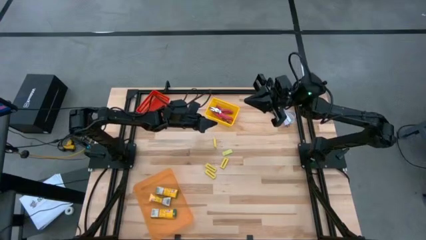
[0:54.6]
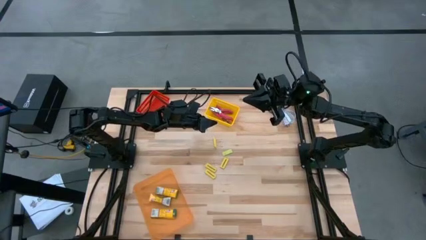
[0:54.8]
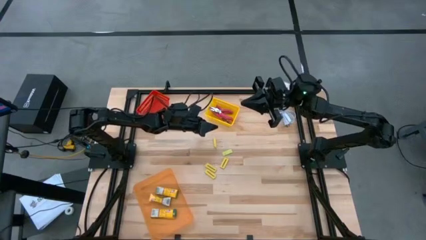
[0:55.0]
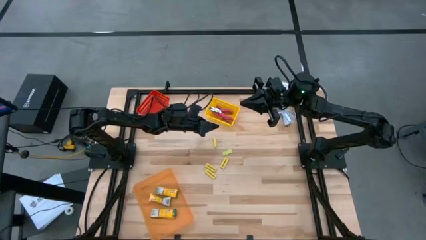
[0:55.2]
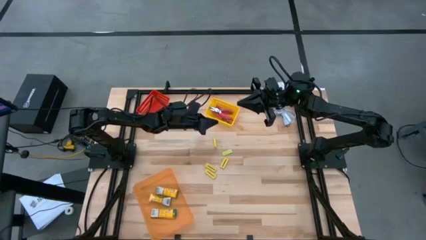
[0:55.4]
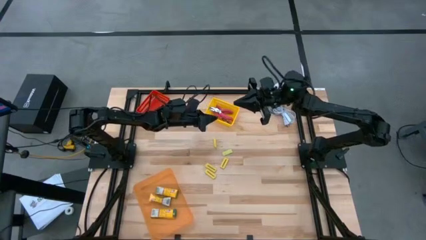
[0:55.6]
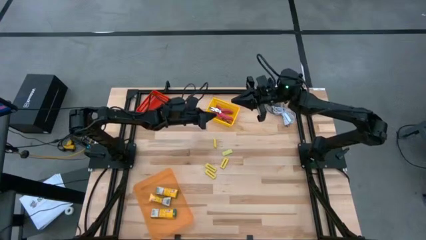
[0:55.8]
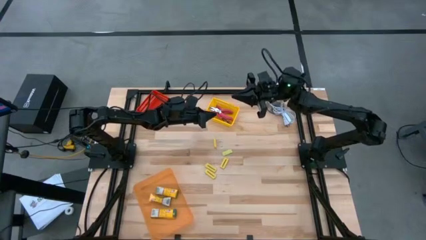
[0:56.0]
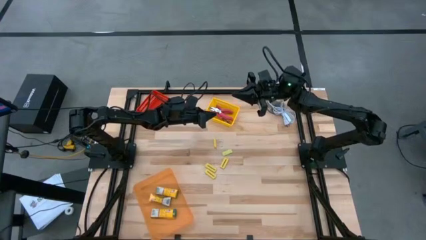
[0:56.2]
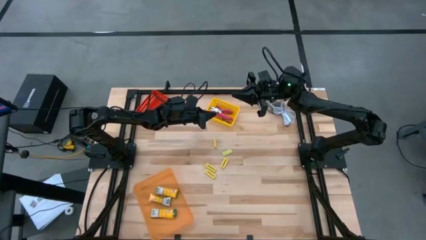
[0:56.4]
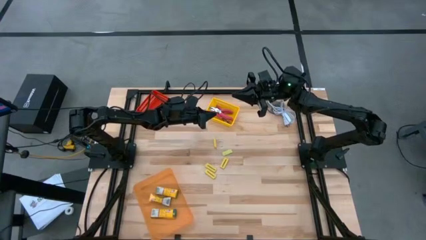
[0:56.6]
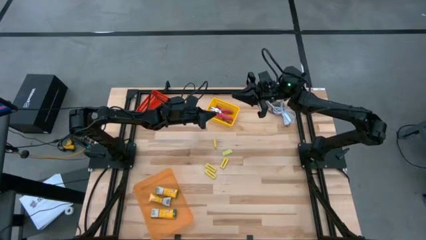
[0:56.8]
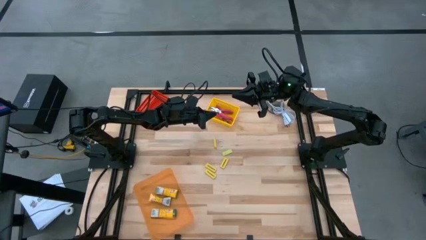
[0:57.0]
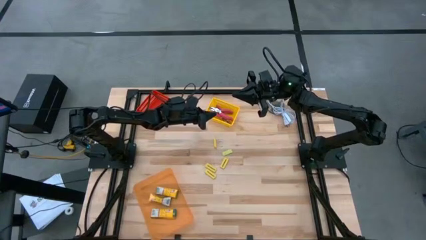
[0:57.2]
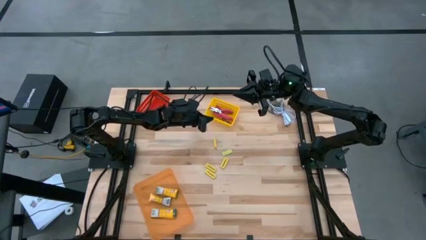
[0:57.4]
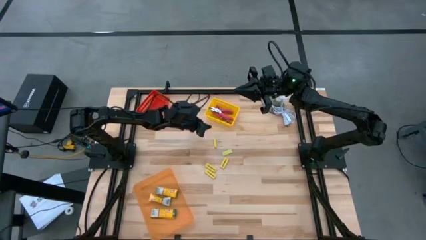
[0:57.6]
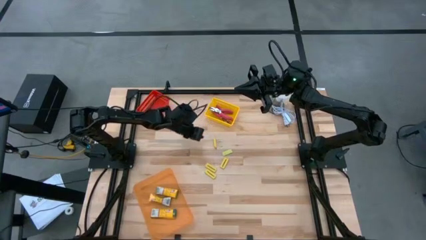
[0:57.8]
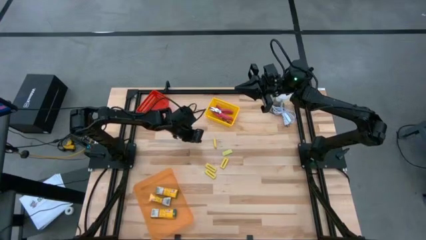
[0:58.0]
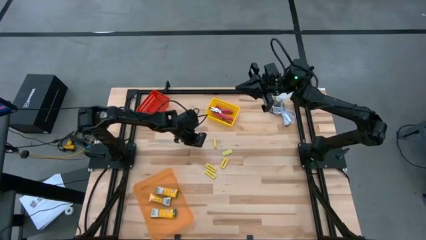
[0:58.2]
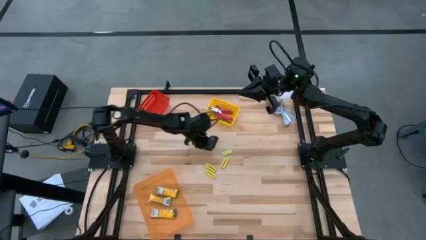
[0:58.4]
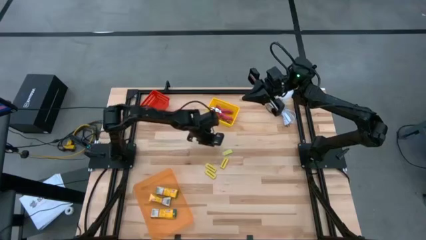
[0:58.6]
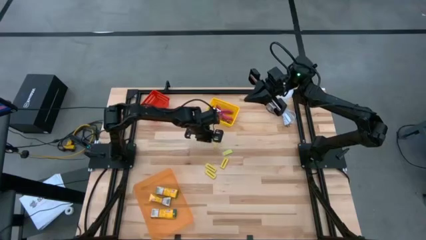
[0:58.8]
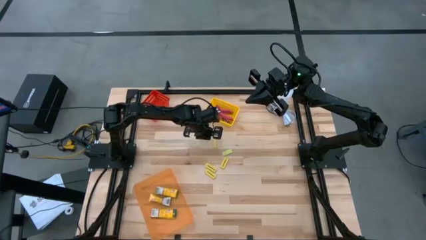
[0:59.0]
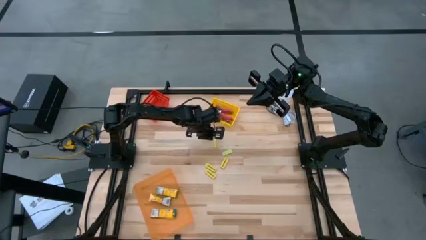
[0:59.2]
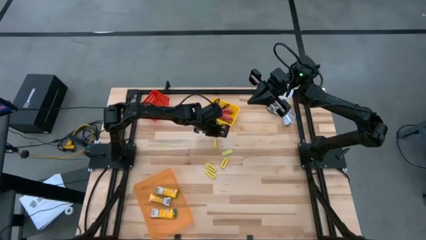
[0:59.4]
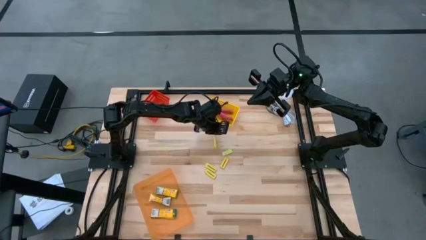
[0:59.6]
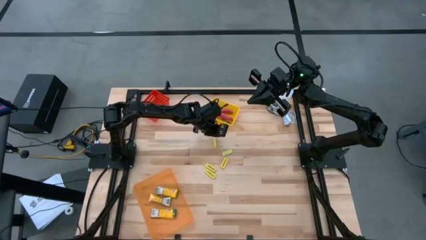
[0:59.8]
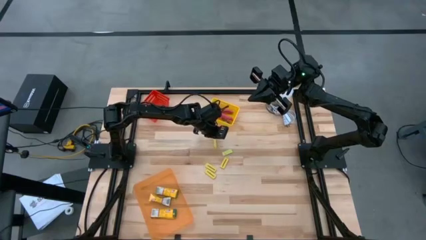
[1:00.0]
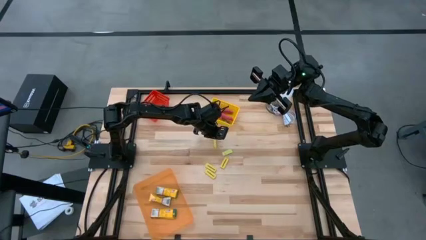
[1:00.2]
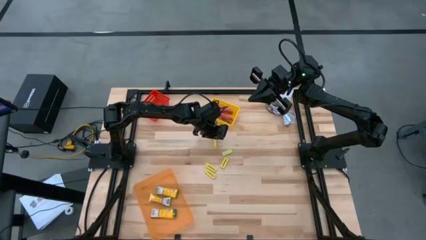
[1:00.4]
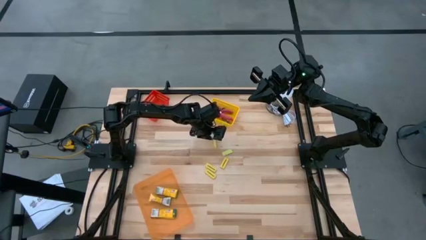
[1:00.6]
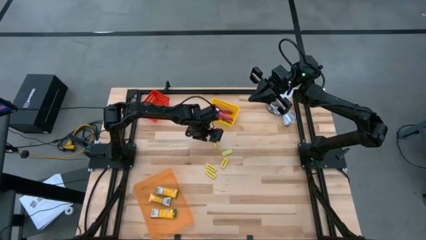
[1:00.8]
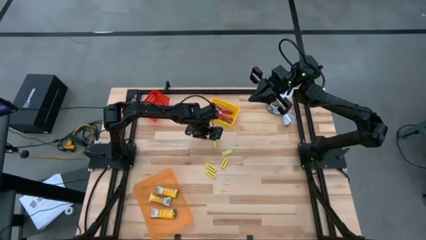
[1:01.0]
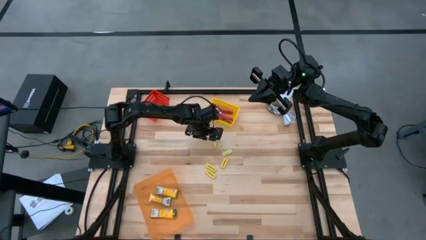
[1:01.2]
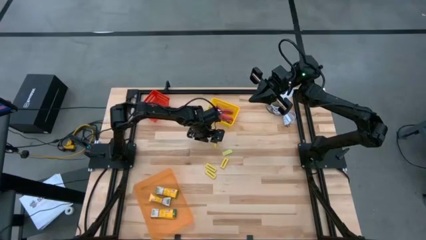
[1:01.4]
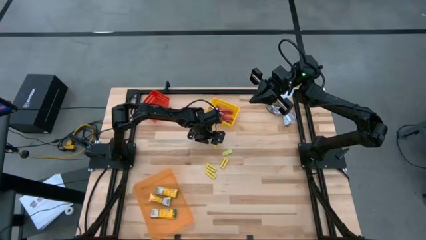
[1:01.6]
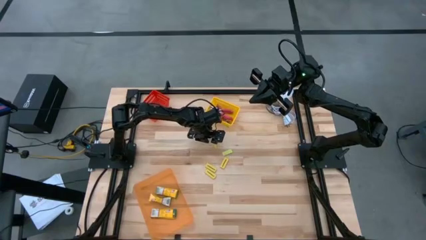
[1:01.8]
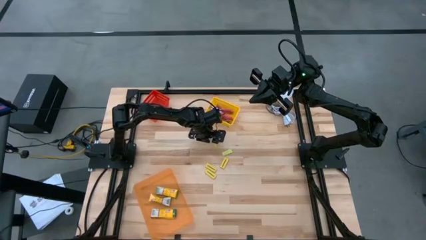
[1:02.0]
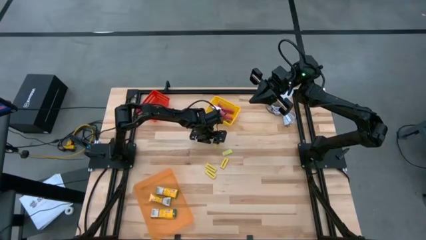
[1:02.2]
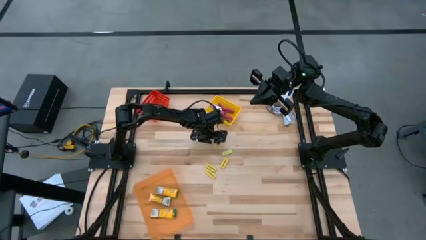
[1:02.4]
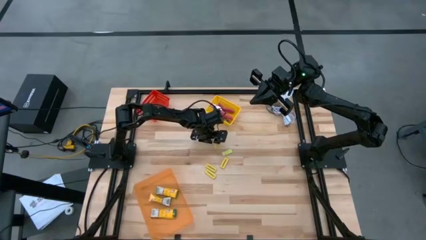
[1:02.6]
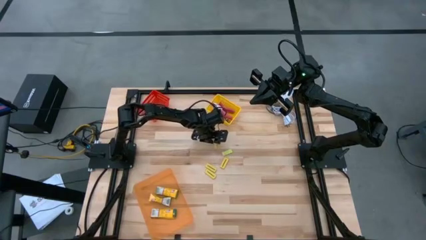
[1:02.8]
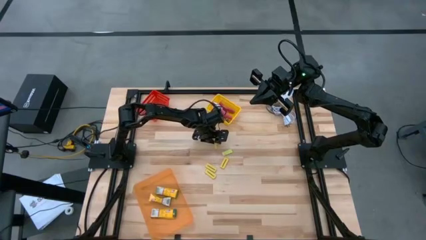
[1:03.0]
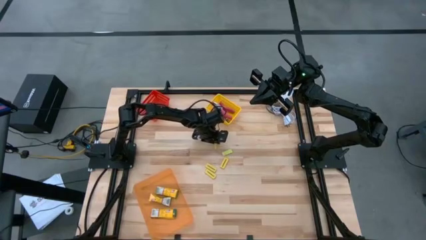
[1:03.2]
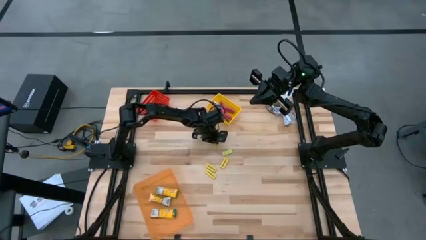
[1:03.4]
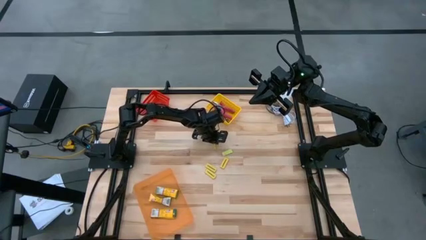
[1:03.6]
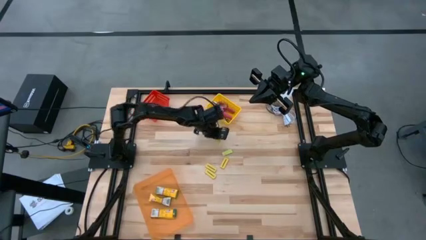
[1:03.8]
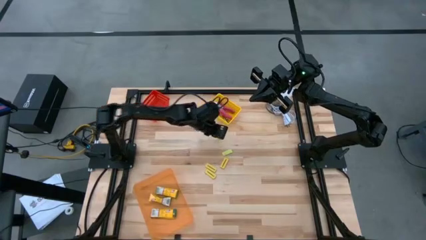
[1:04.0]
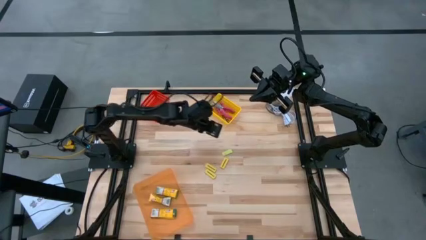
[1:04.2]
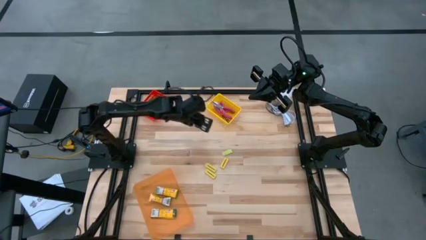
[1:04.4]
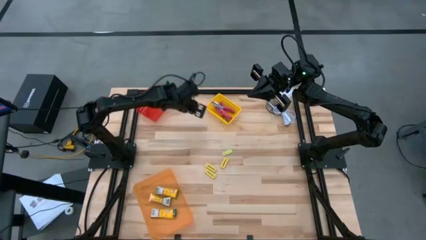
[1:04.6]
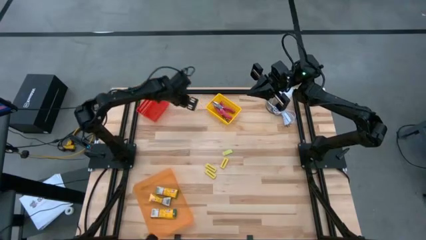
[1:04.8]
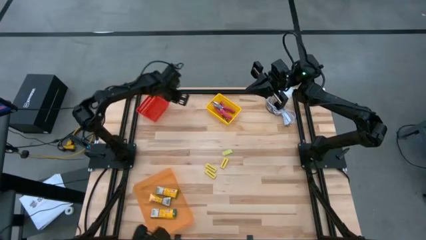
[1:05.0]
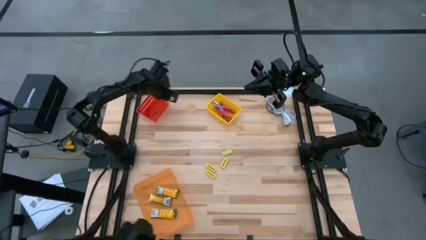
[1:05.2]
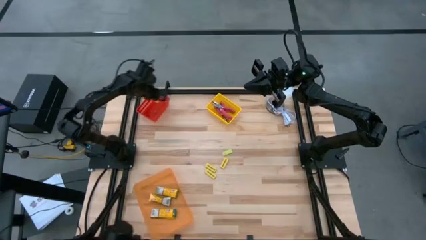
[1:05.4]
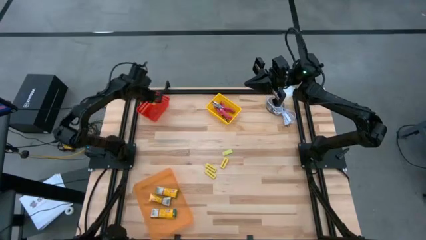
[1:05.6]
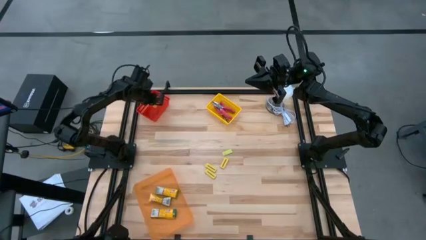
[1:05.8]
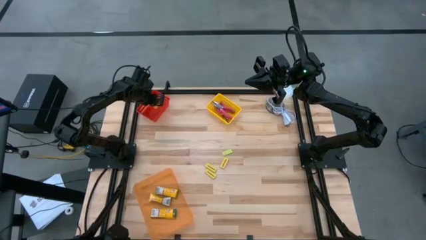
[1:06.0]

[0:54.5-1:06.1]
Task: Pick & Place School Supplies
Put the yellow eraser into the red bin

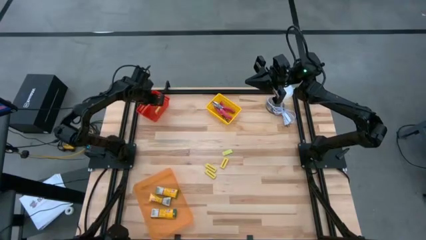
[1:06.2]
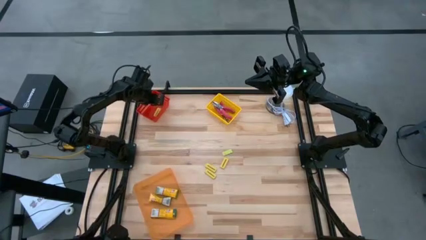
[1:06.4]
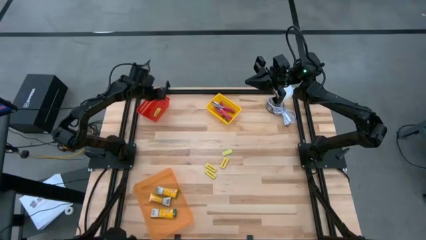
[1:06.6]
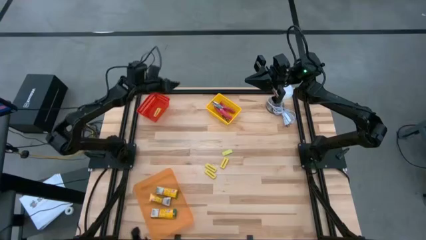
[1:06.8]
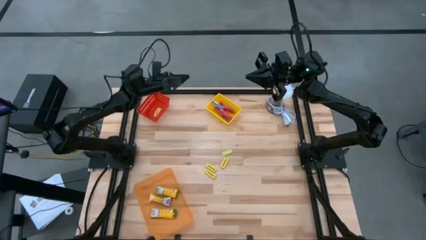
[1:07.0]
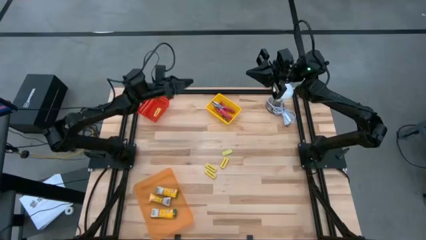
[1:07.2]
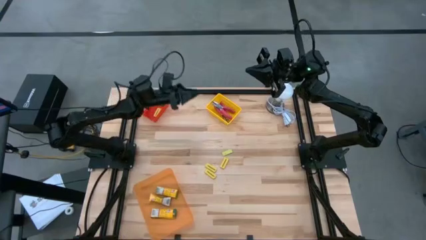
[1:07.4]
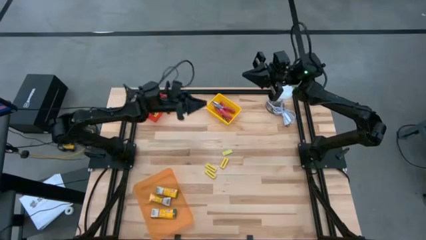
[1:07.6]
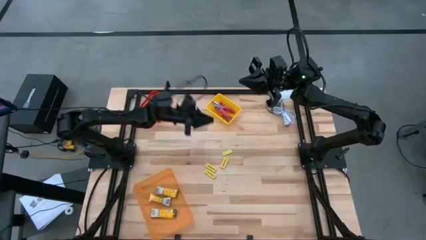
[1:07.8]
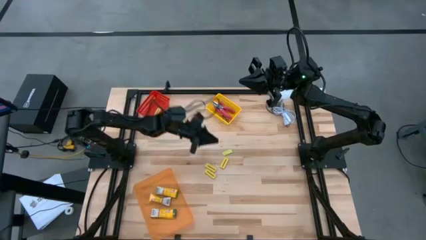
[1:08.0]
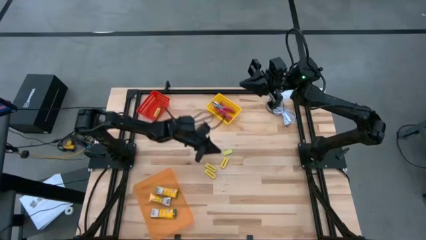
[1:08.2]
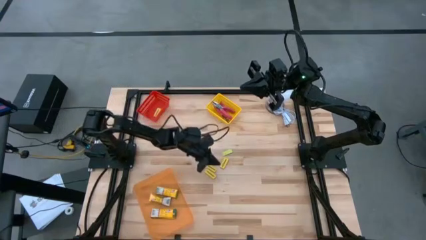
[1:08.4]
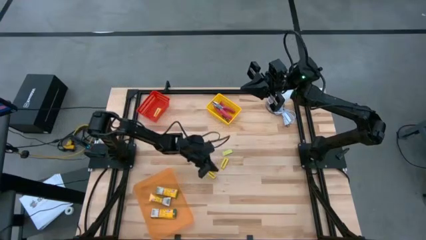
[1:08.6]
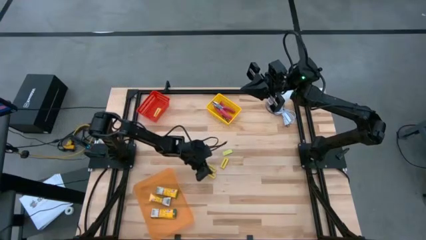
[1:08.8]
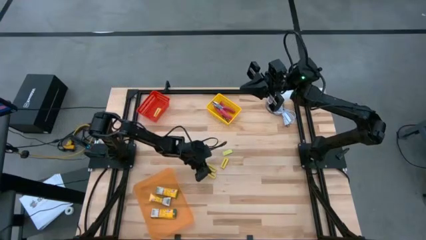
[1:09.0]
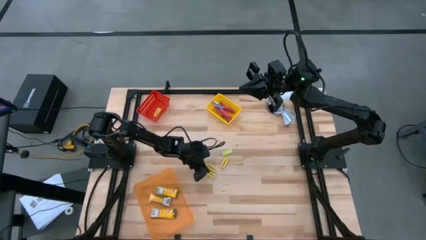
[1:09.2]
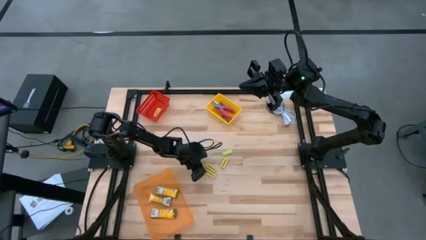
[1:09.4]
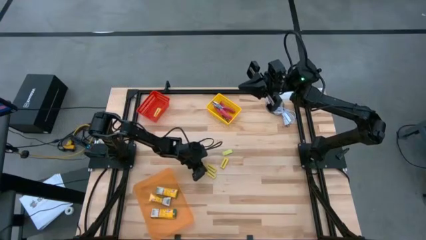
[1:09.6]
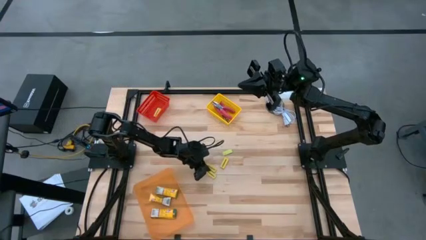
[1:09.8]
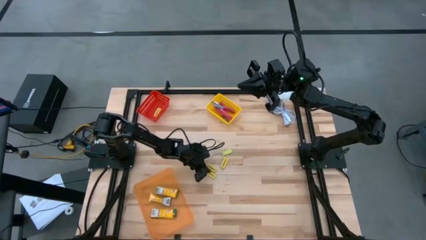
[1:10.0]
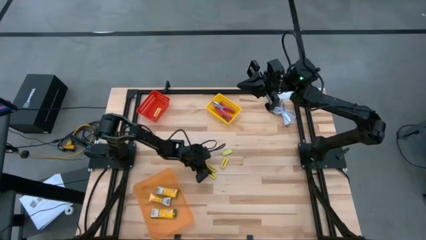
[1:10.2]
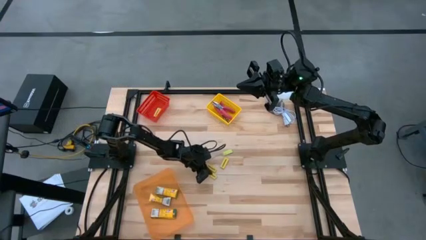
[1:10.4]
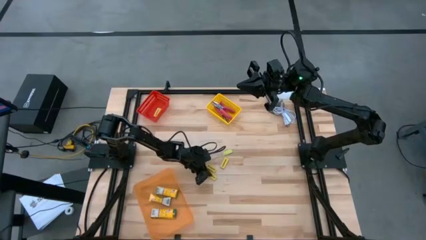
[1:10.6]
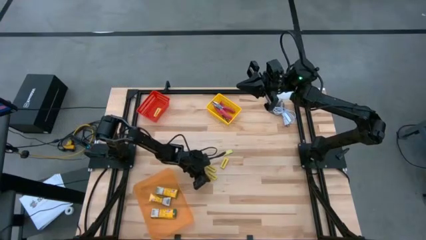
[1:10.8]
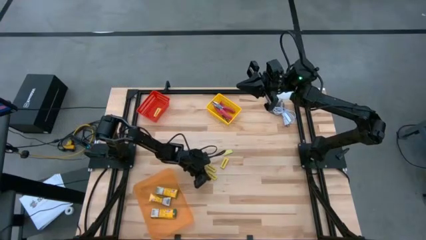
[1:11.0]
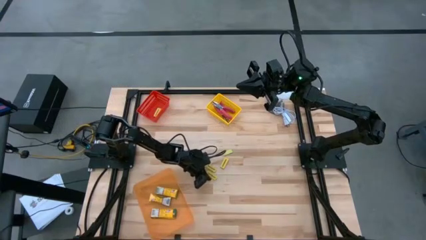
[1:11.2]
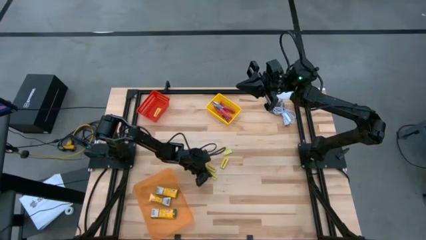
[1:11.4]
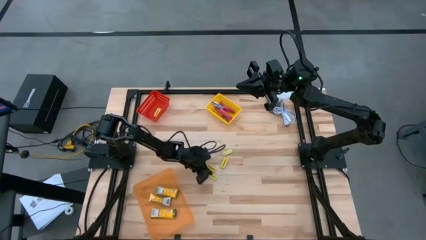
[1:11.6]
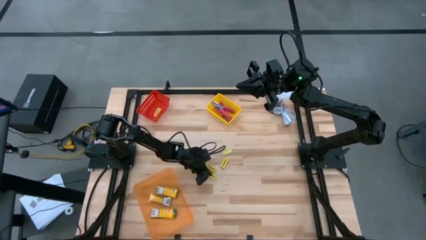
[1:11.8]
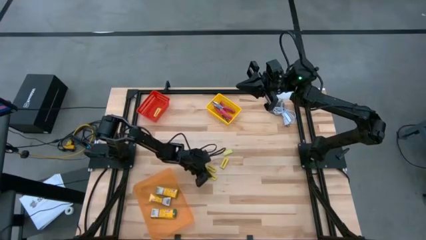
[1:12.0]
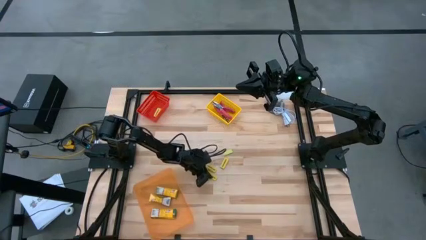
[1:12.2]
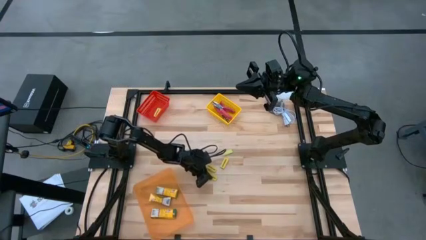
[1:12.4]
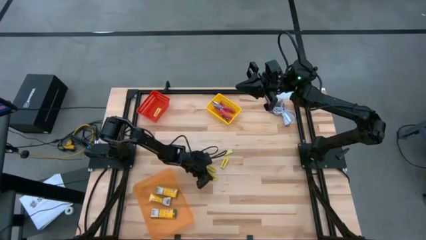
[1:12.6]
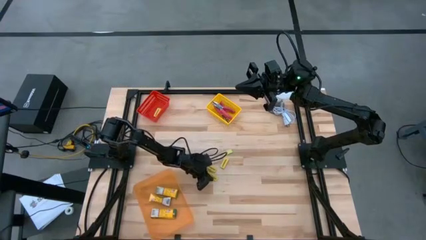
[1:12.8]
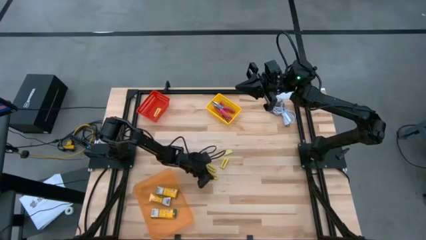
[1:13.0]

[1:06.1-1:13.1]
Put the yellow eraser into the red bin
